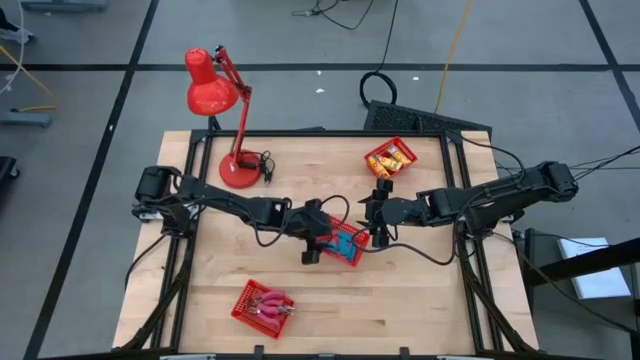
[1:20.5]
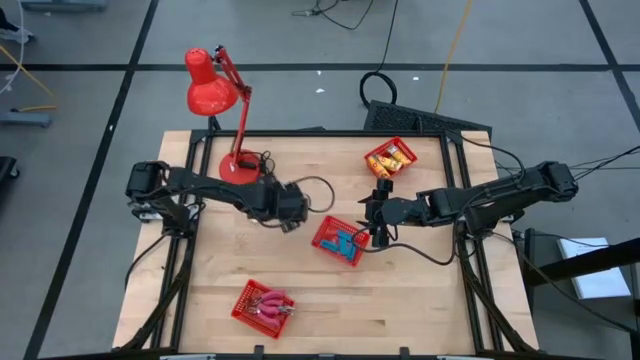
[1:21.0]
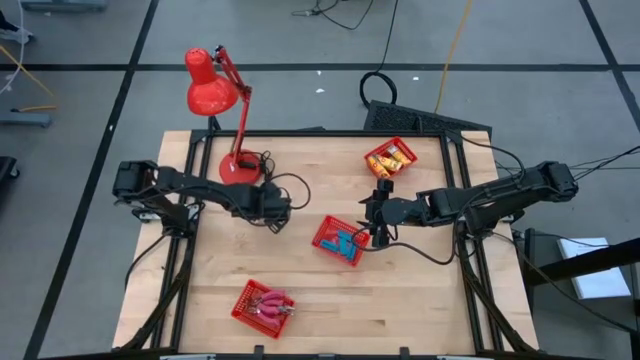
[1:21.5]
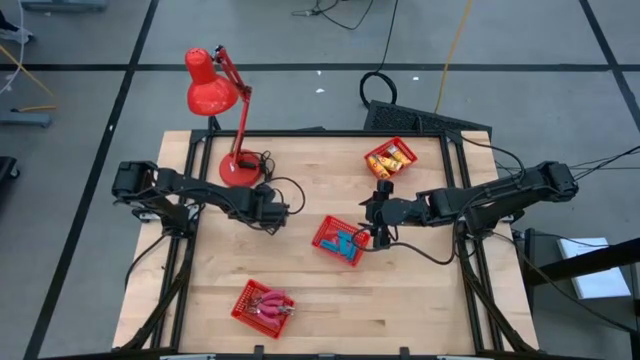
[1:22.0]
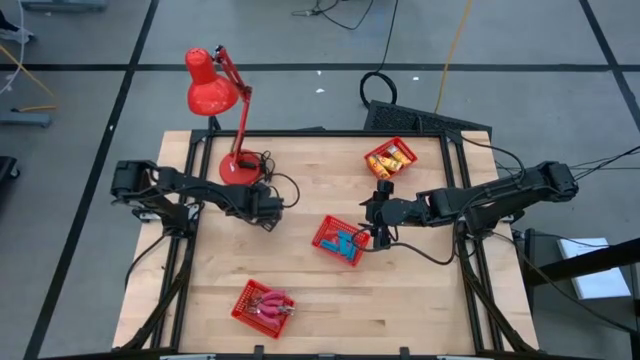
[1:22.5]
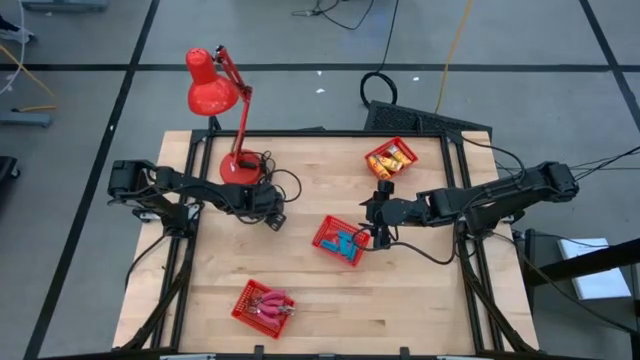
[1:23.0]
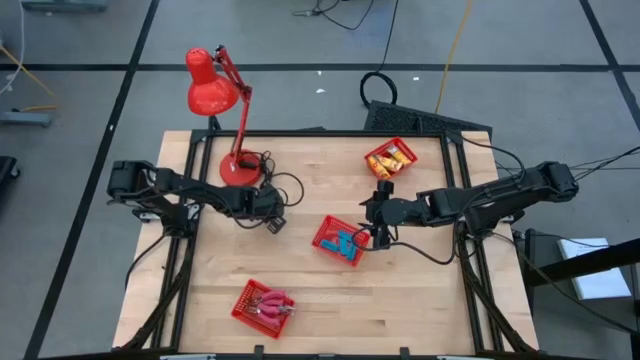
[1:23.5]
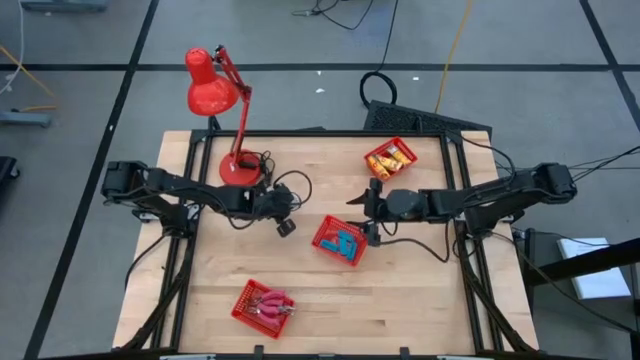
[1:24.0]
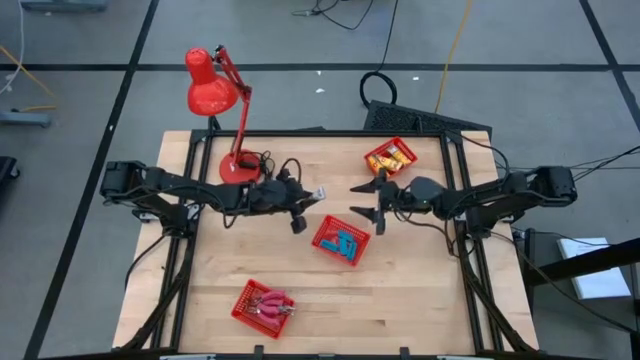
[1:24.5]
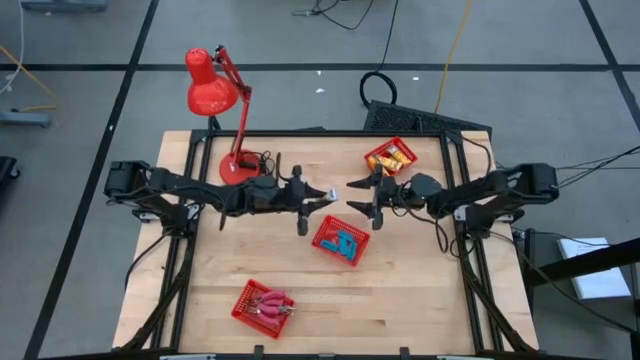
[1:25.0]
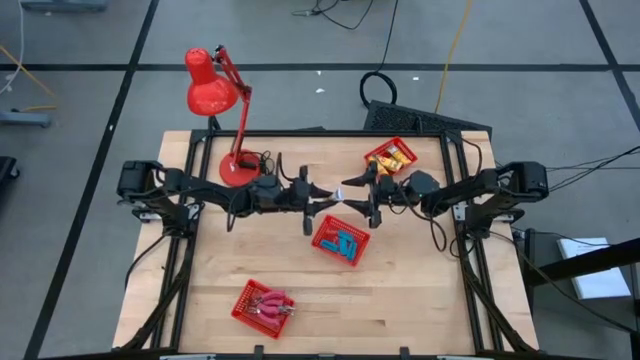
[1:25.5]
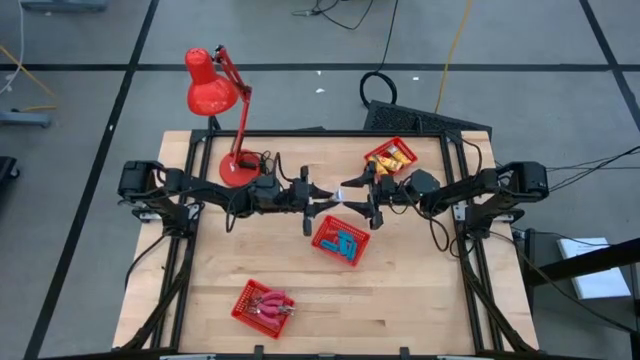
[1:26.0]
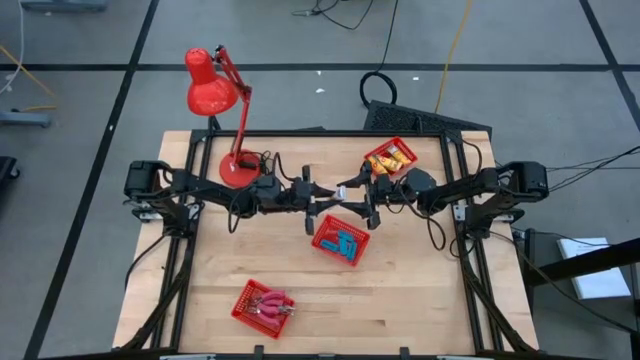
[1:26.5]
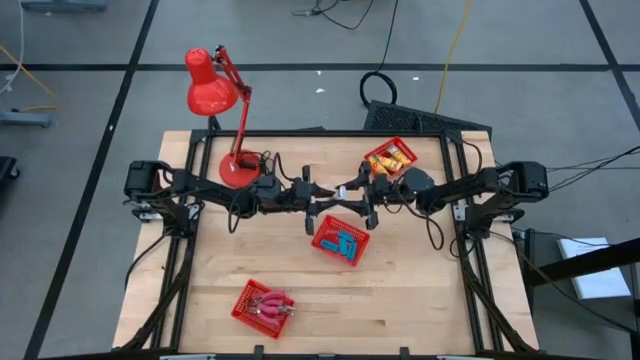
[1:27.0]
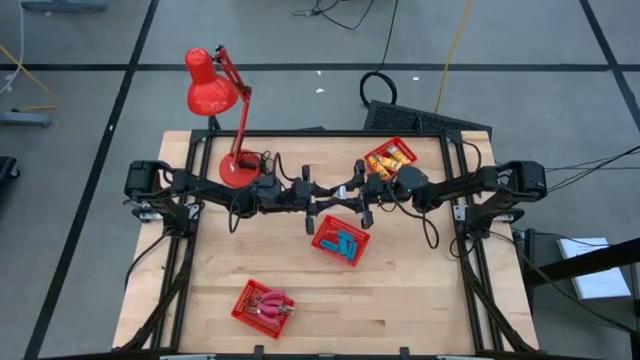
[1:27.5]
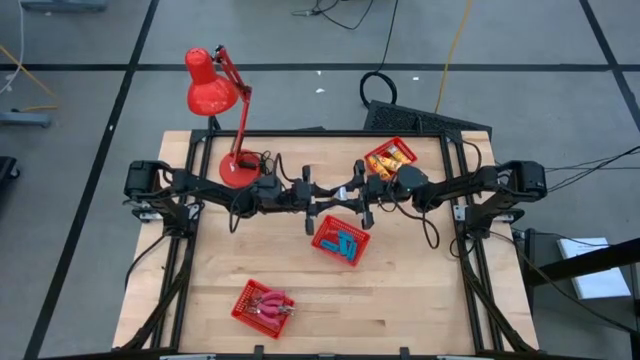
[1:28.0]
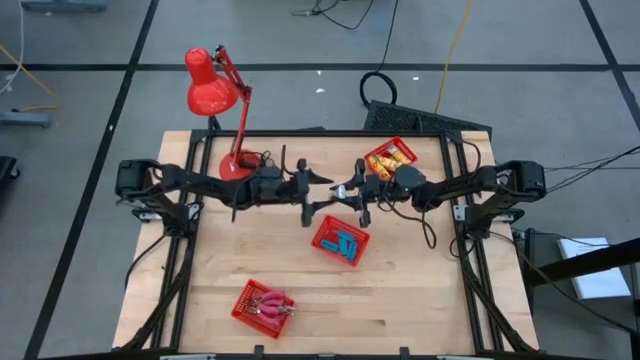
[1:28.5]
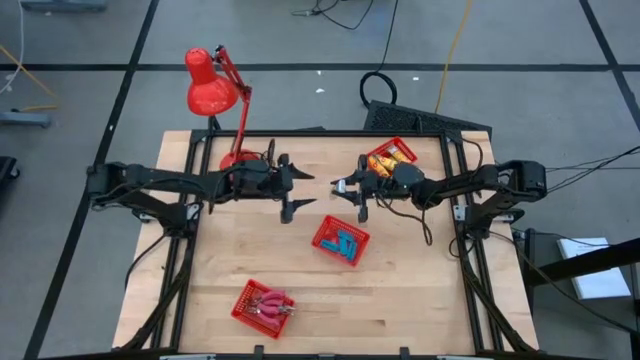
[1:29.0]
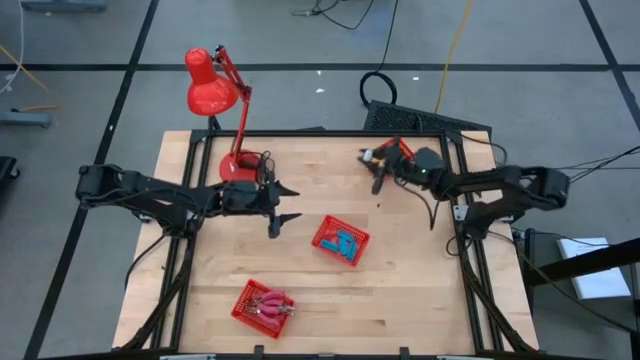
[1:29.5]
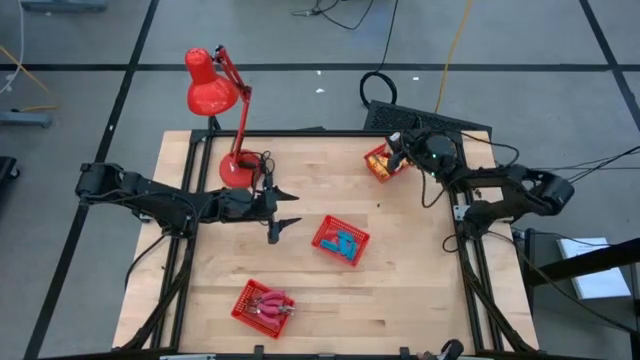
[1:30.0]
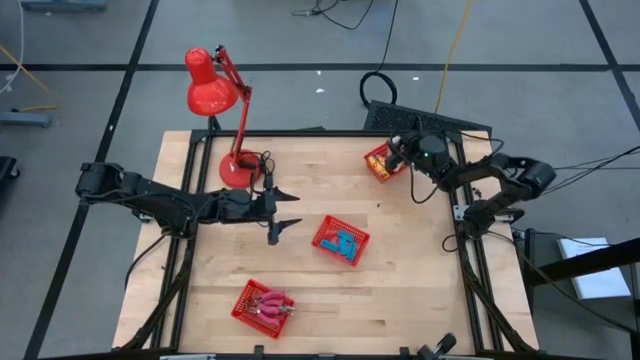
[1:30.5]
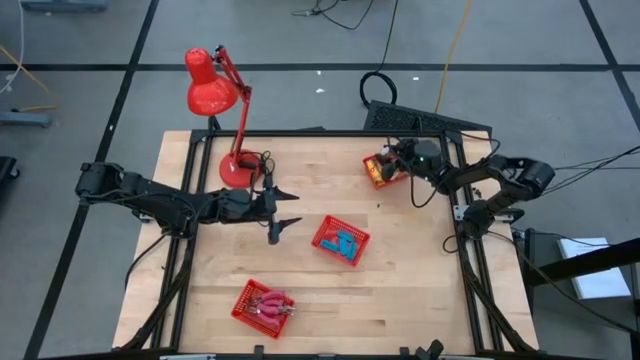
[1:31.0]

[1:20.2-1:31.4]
Task: Pick & Place School Supplies
Put the yellow crayon box into the top red bin

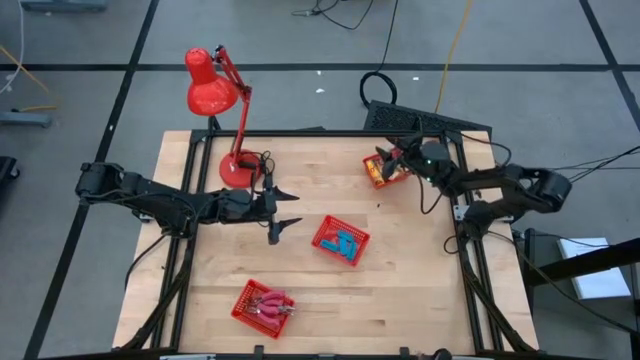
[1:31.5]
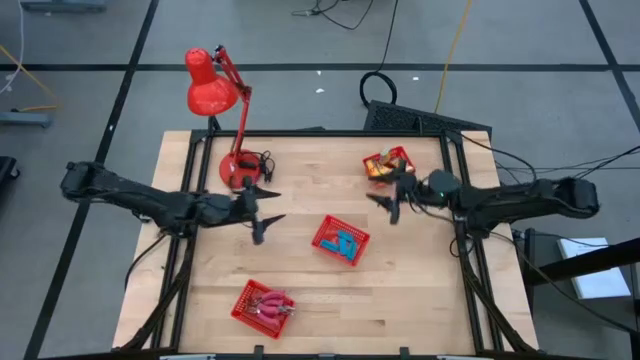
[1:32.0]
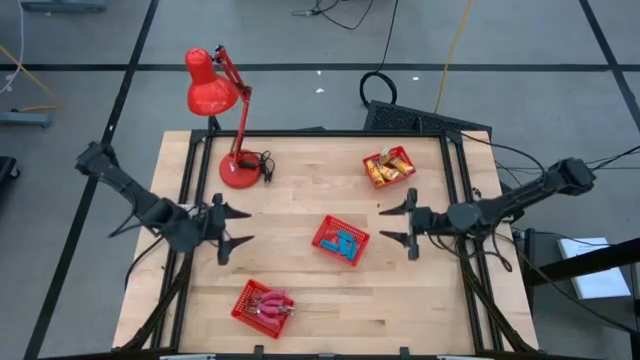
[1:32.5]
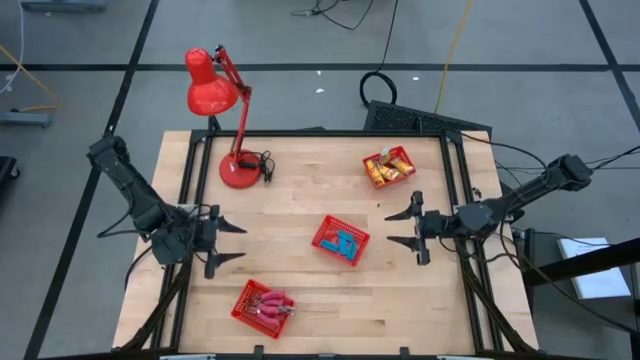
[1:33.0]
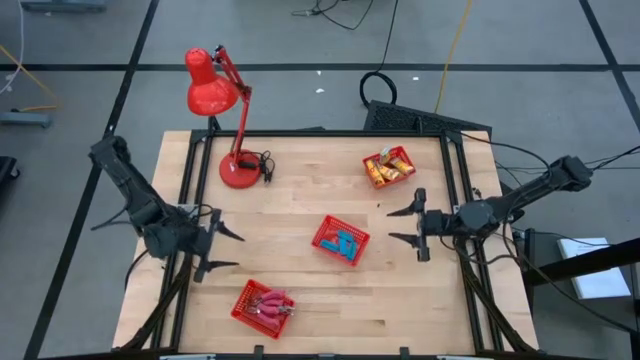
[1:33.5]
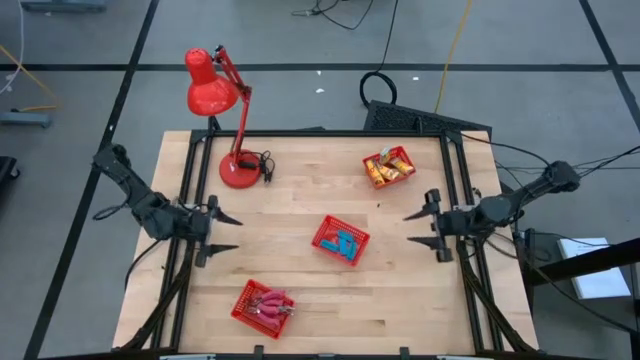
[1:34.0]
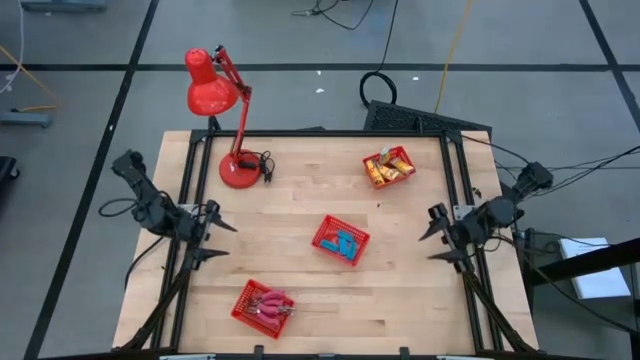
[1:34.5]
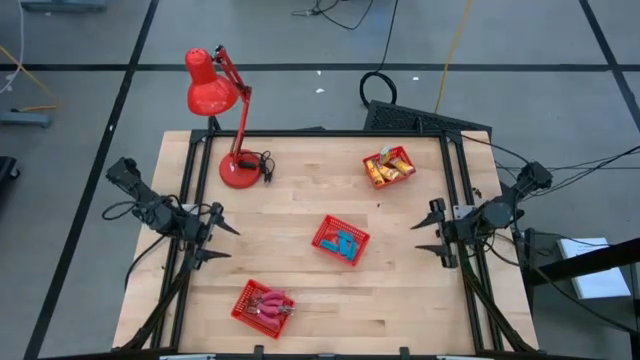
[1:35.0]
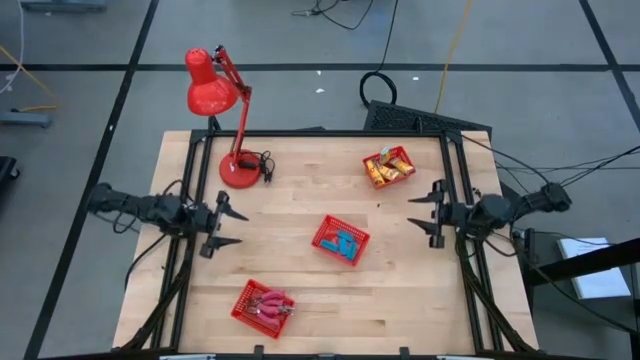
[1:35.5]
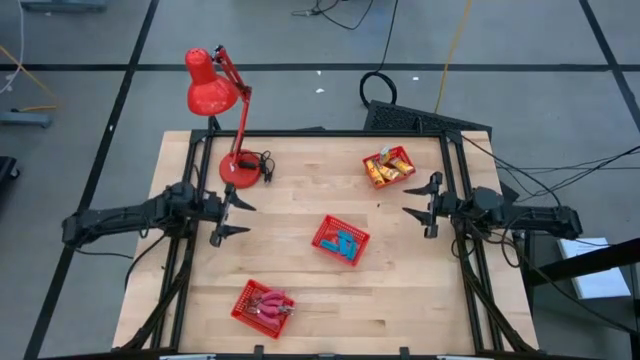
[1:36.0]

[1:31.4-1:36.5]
Return to Home Position

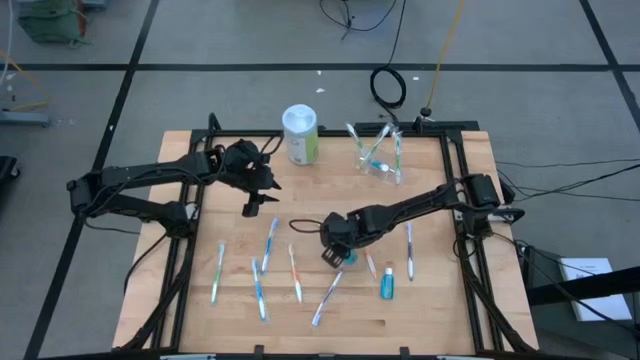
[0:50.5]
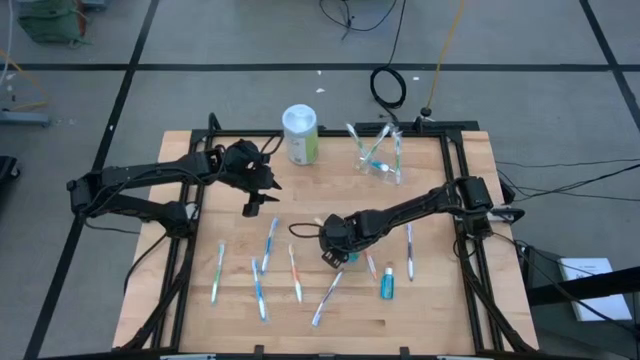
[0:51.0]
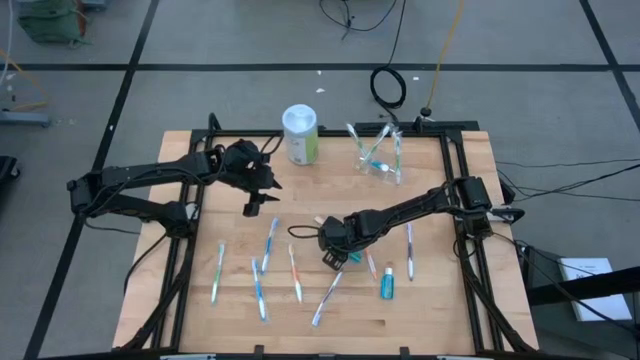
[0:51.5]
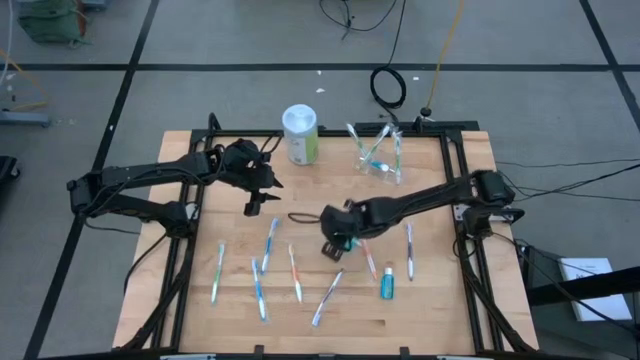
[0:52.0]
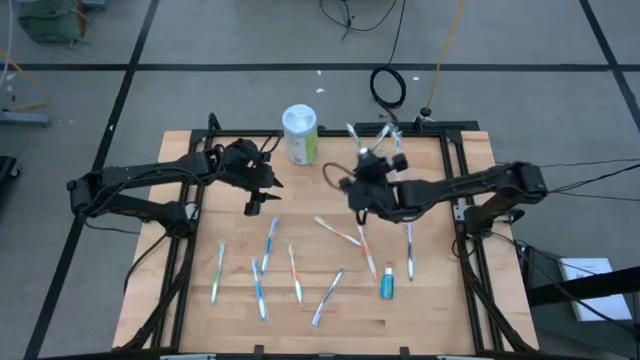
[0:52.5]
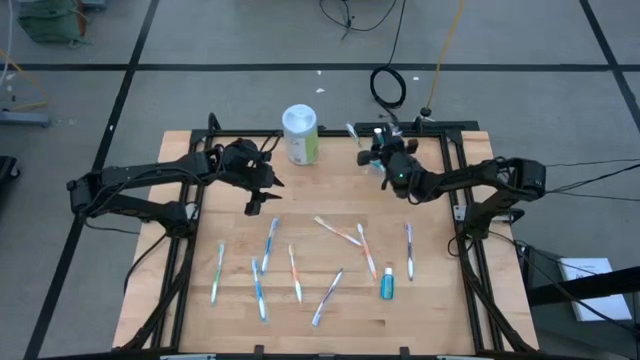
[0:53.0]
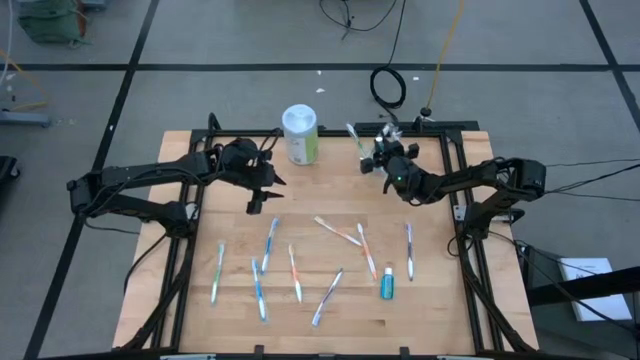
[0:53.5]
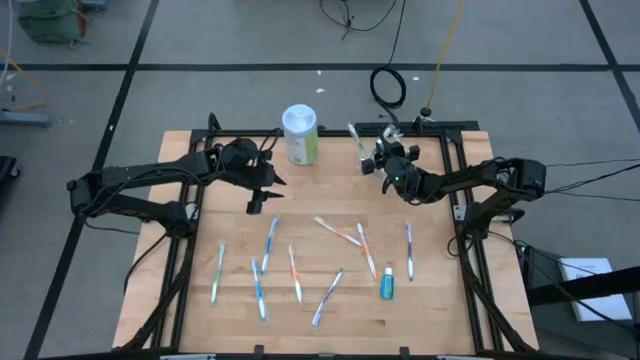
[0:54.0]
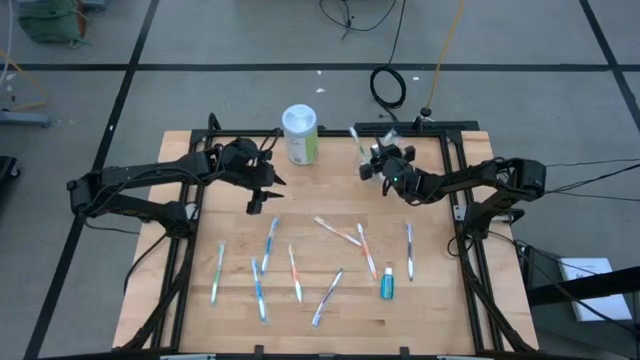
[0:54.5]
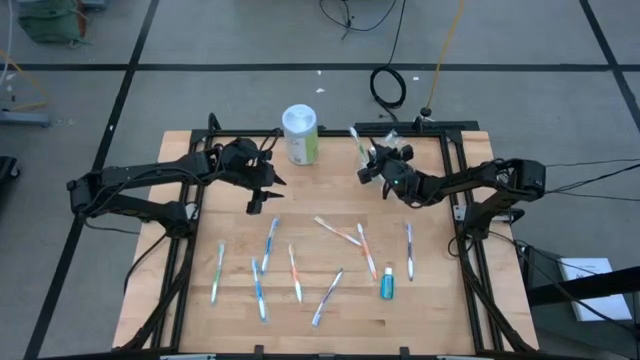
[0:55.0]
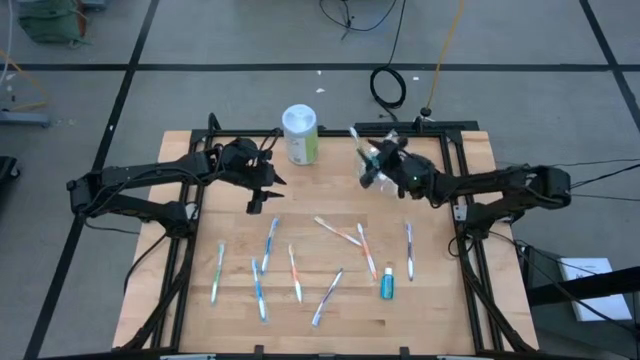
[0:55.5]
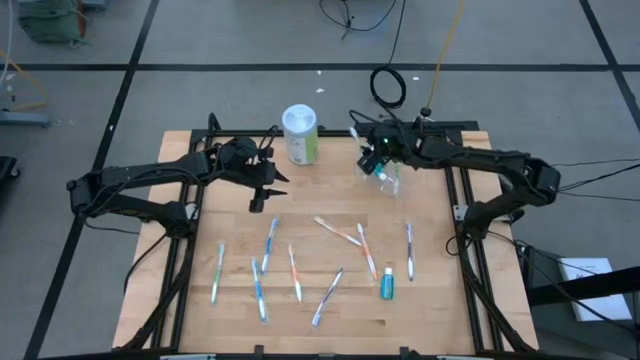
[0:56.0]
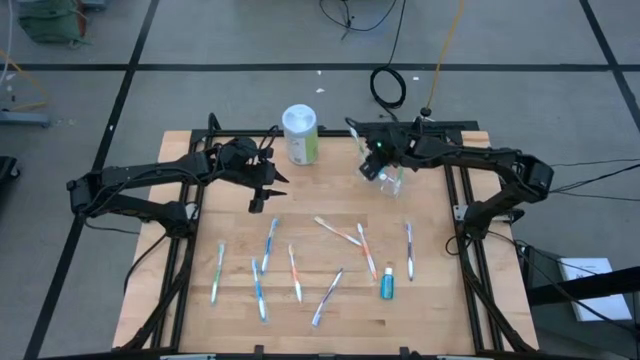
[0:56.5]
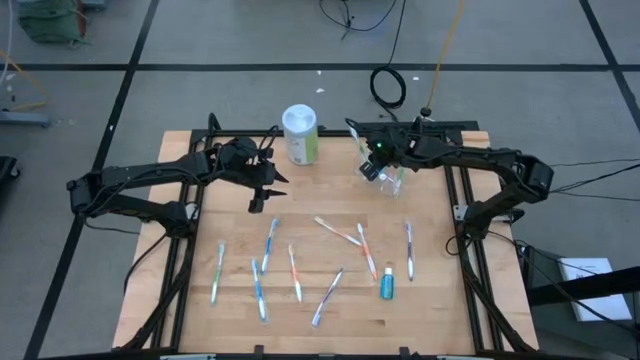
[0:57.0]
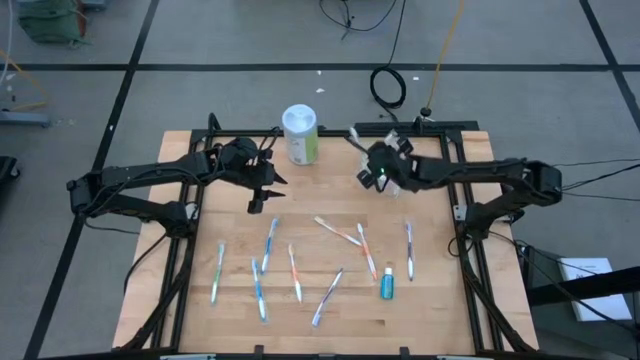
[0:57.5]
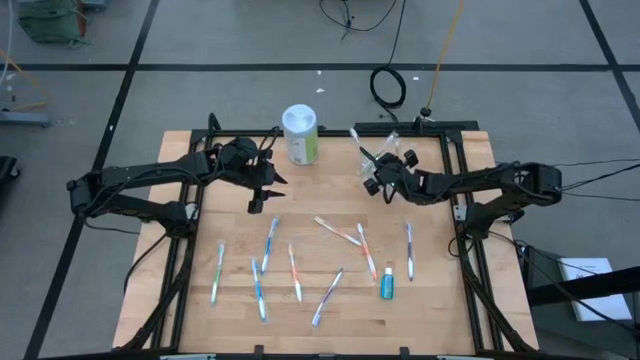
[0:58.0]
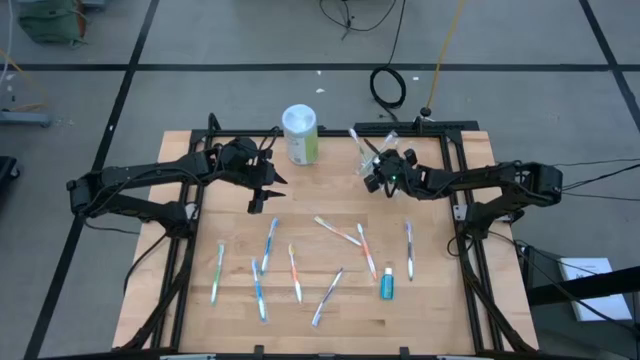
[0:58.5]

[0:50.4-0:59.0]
Task: Pick & Place toothbrushing station
Put the blue mouthwash into the transparent organizer
